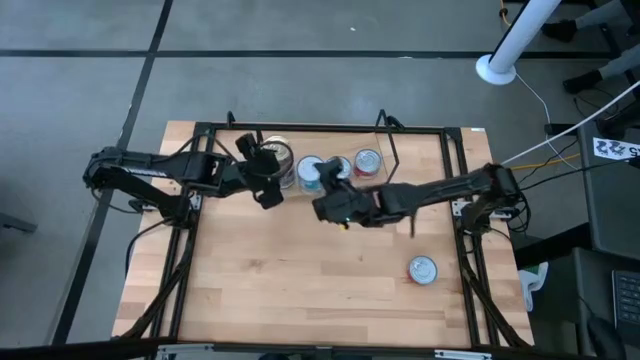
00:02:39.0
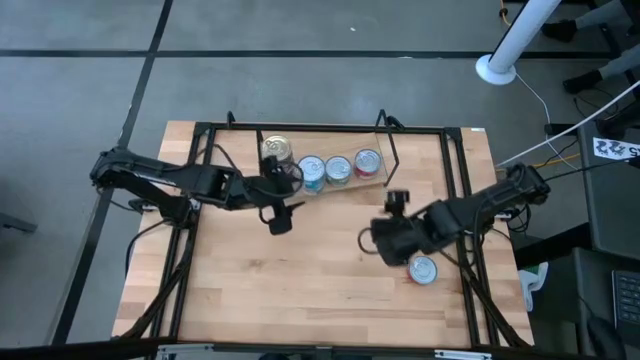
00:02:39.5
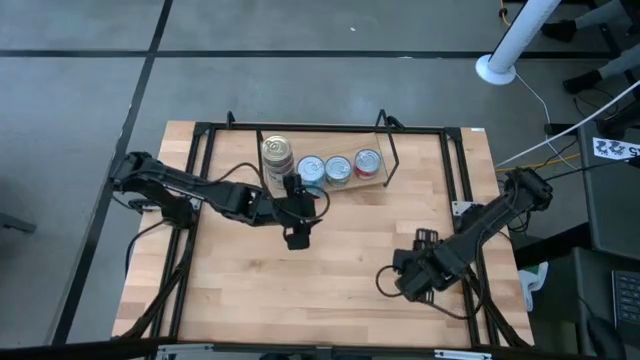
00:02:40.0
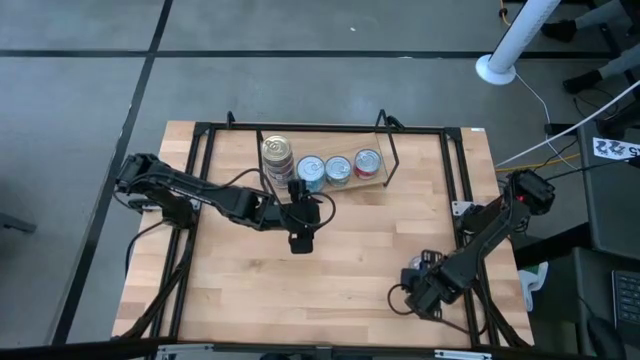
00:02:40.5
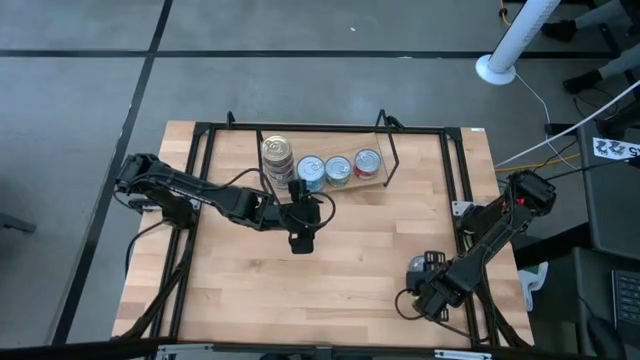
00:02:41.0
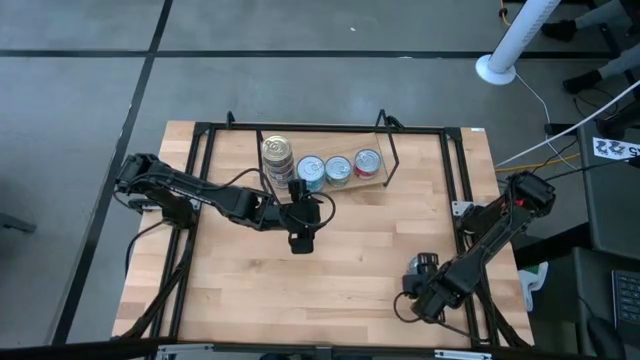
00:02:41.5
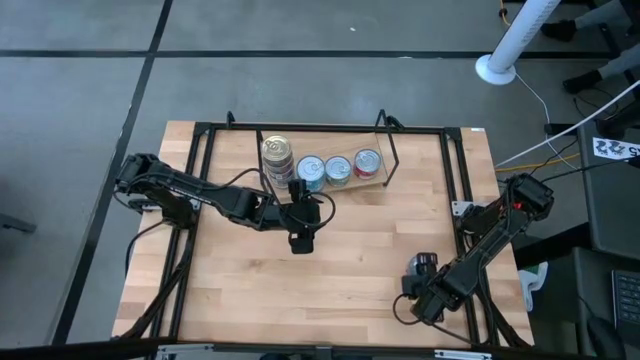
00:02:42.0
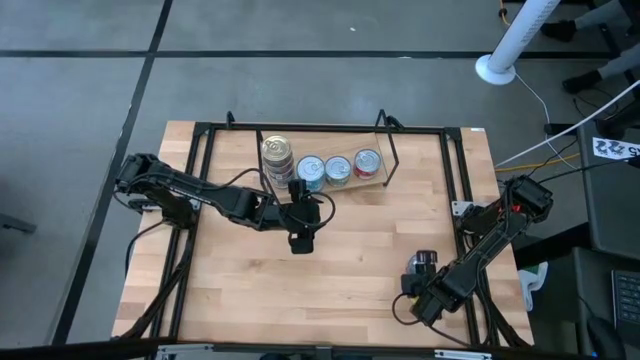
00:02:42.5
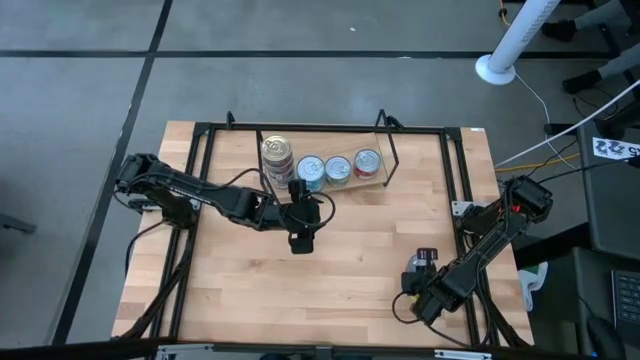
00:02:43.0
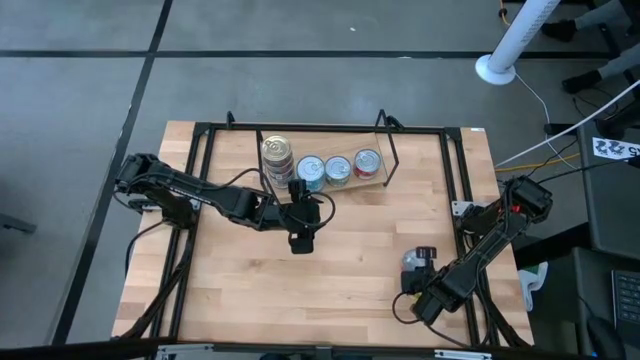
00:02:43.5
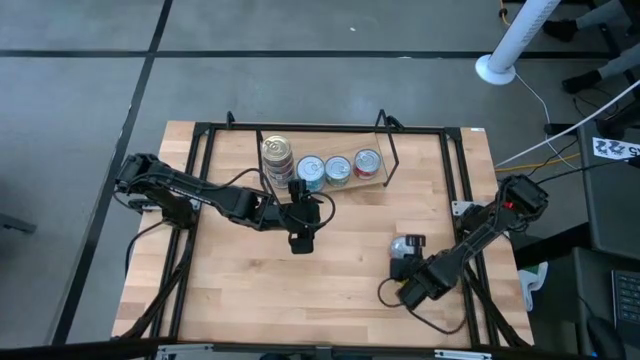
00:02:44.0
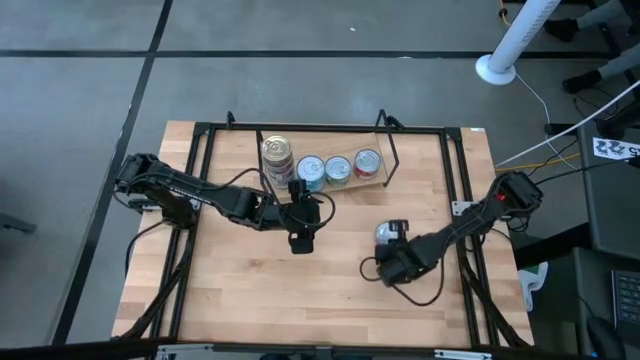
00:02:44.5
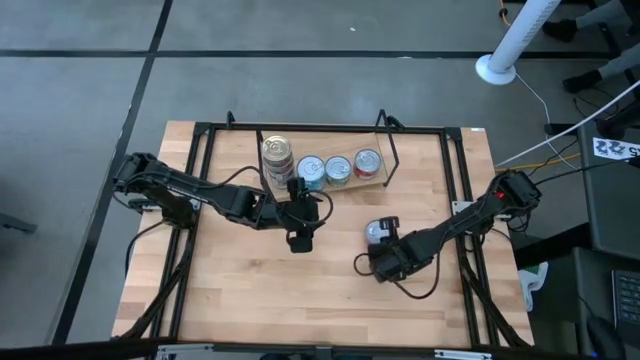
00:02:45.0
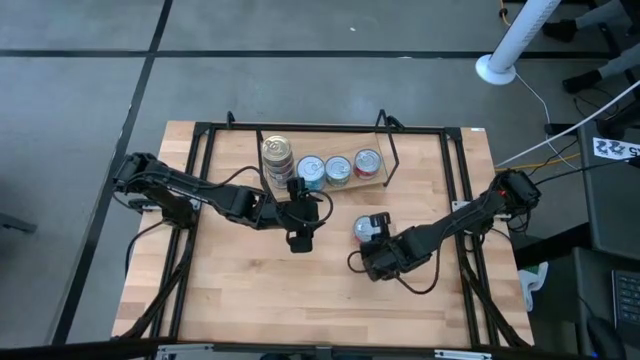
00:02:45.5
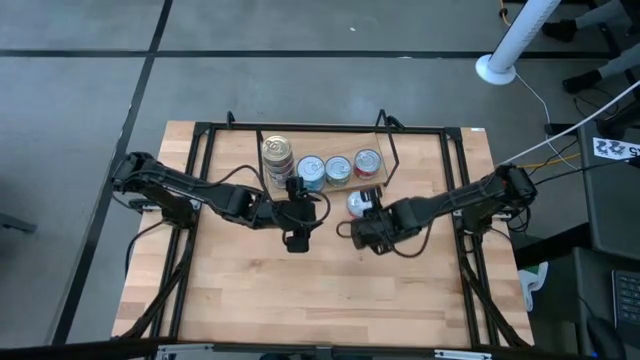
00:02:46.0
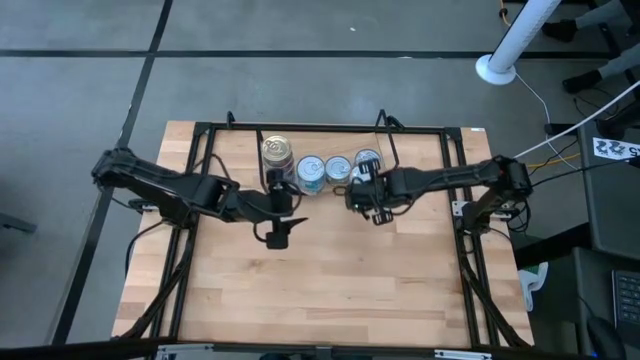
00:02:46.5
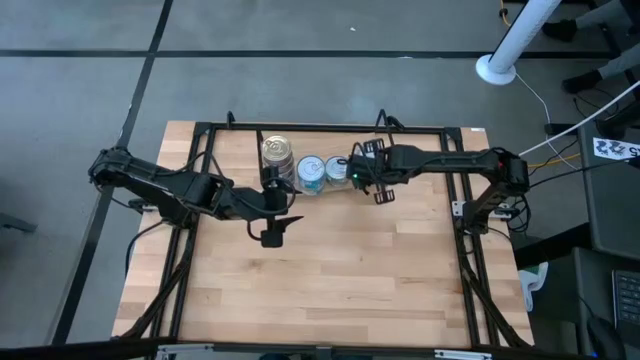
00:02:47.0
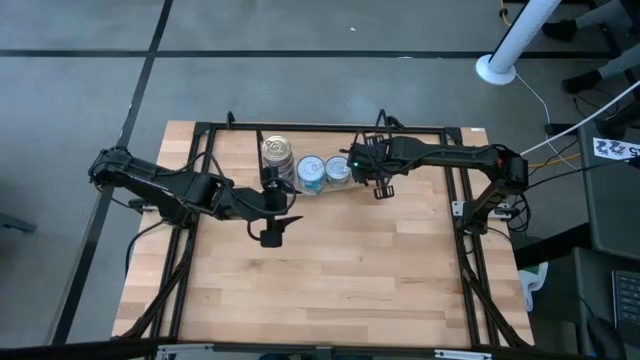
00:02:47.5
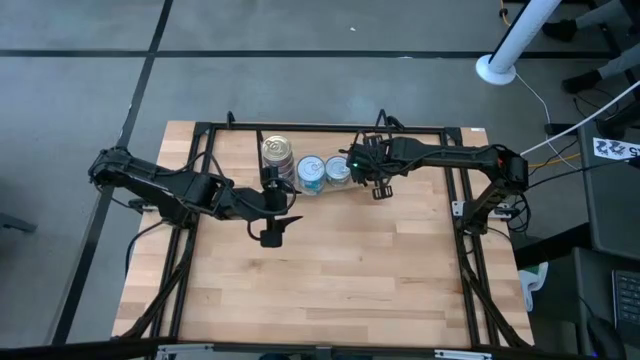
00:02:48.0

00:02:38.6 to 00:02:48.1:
Task: Stack canned seafood by type on shelf
Stack the red tuna can on top of the other red tuna cans on the shelf

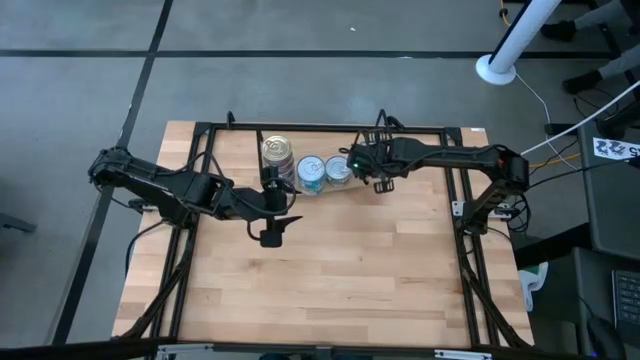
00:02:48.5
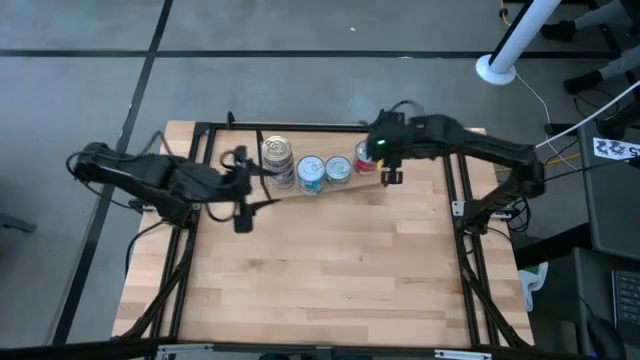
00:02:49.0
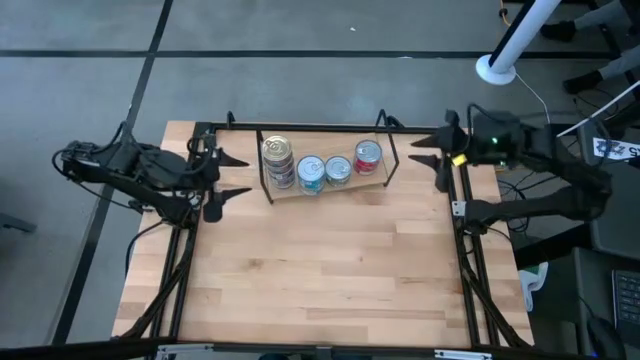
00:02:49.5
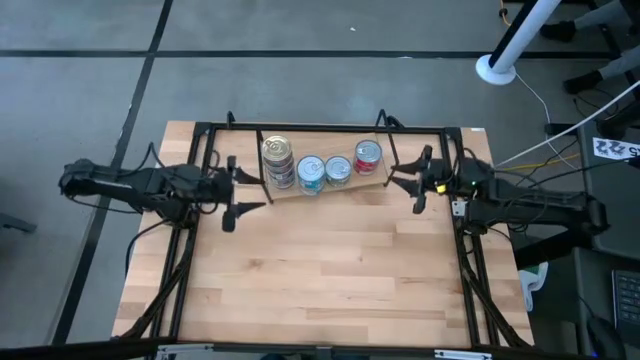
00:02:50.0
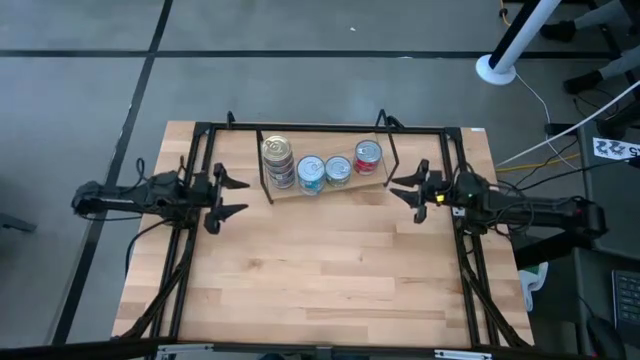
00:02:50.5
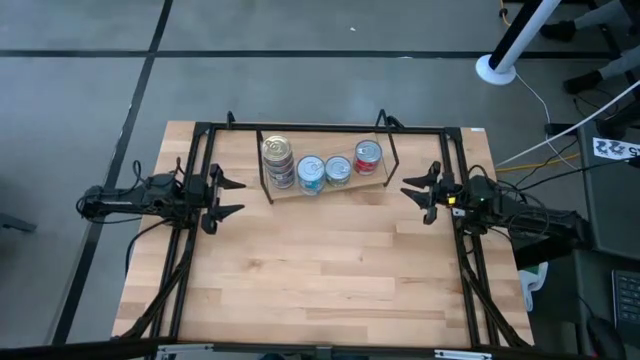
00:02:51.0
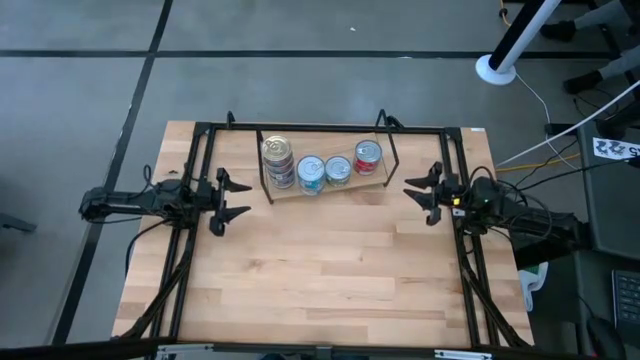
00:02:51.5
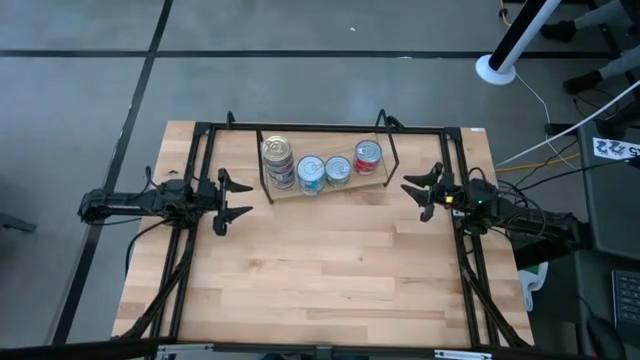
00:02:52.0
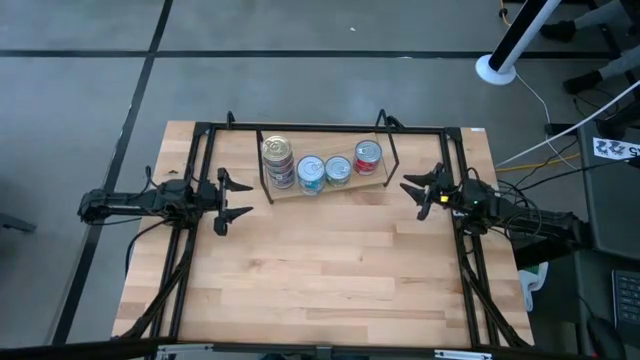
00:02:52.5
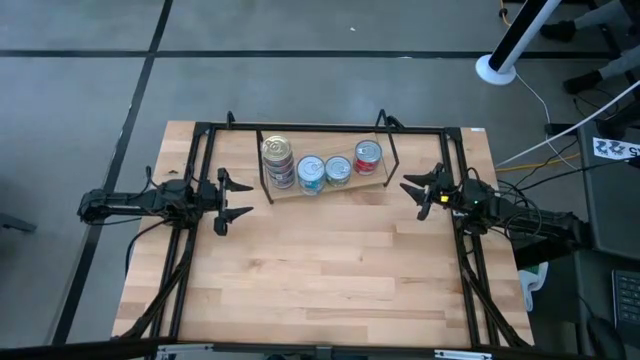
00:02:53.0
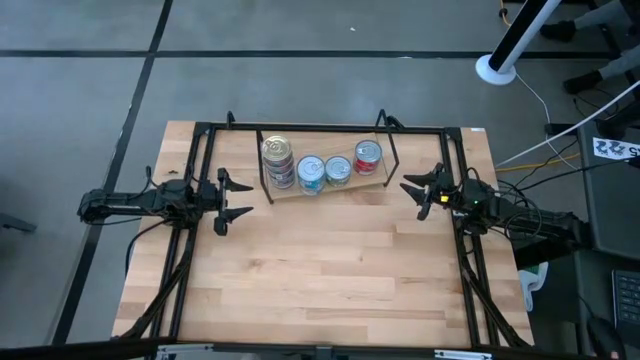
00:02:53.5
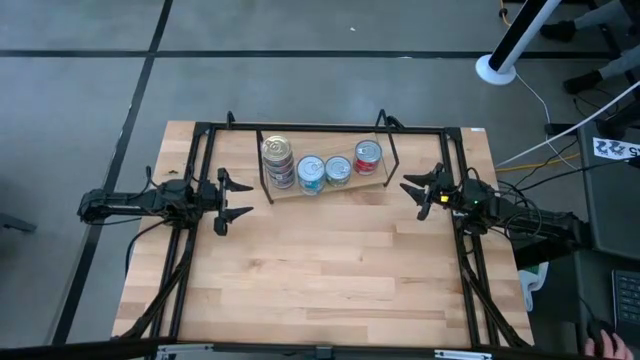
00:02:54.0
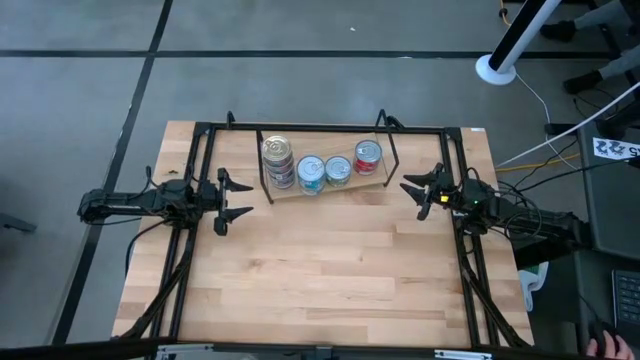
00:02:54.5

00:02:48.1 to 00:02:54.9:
Return to Home Position

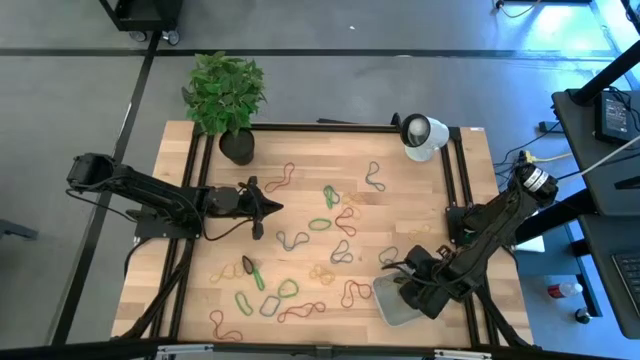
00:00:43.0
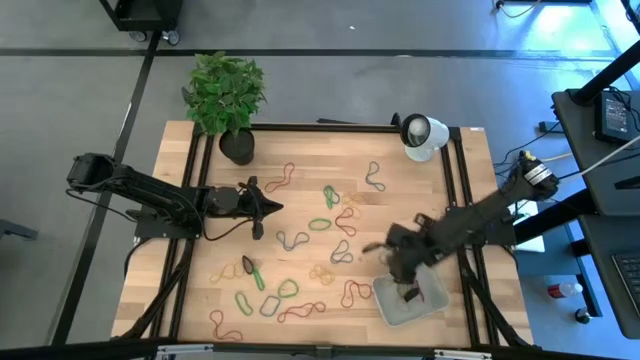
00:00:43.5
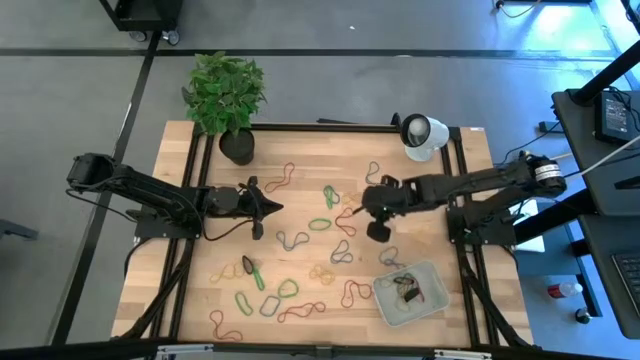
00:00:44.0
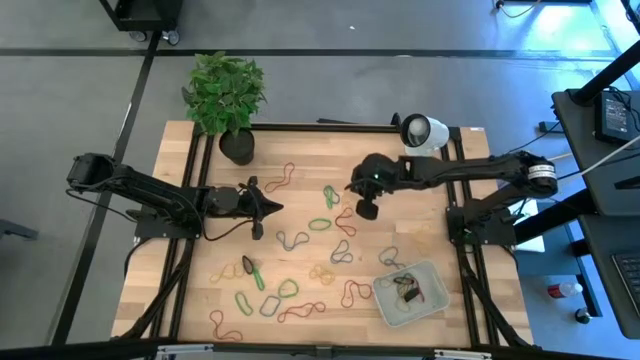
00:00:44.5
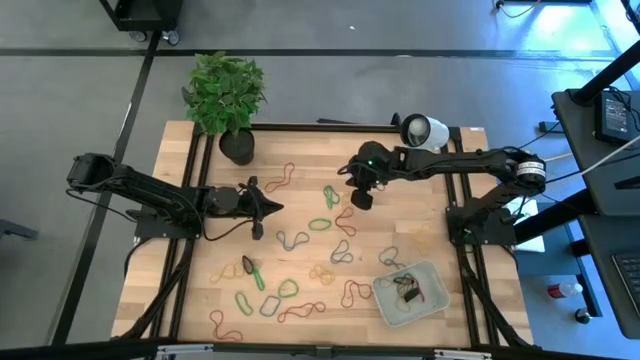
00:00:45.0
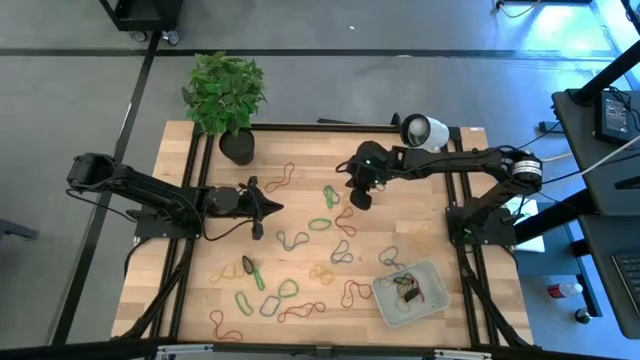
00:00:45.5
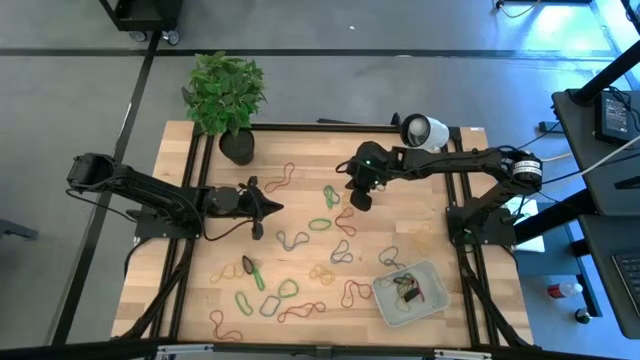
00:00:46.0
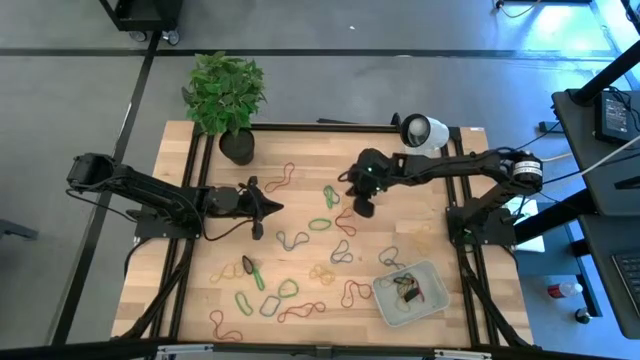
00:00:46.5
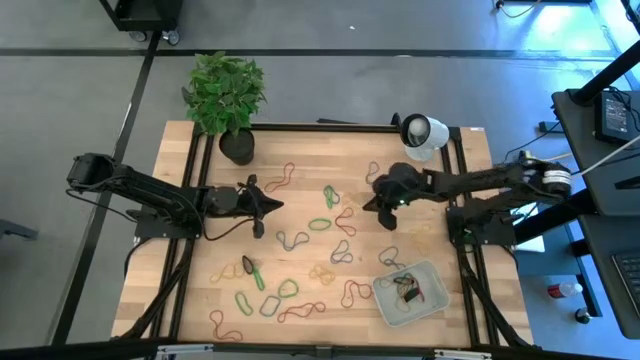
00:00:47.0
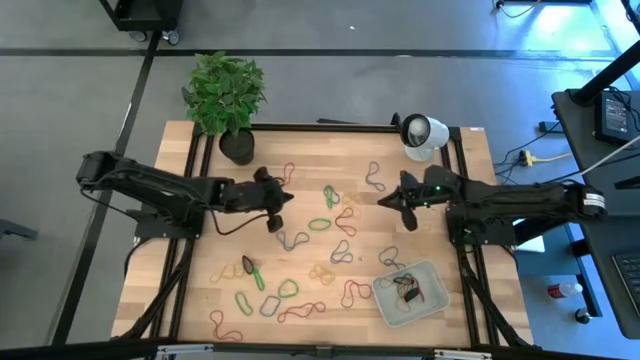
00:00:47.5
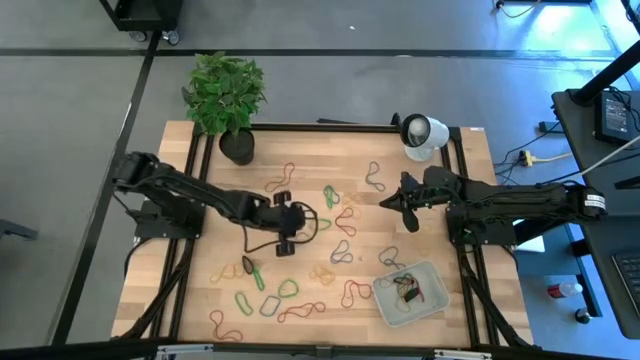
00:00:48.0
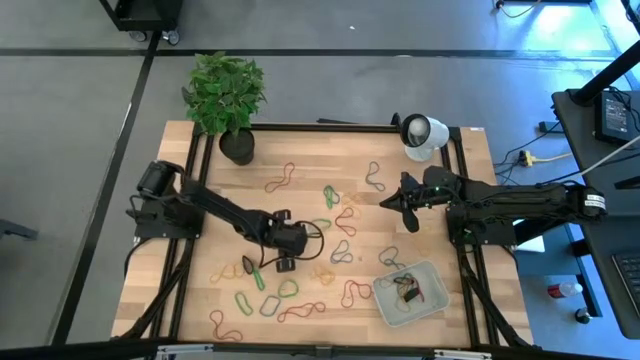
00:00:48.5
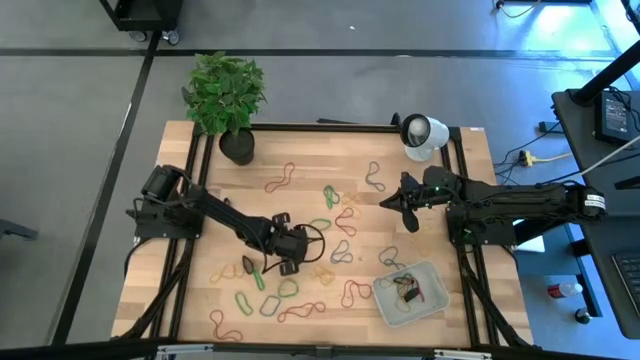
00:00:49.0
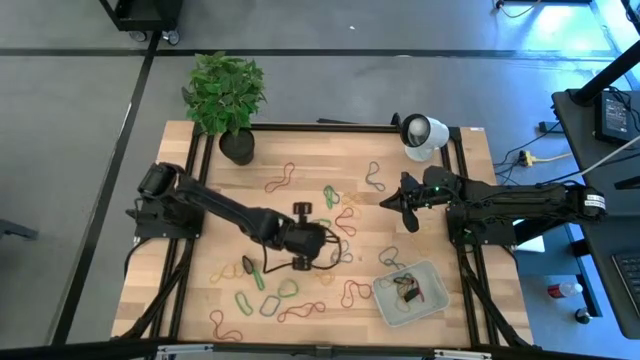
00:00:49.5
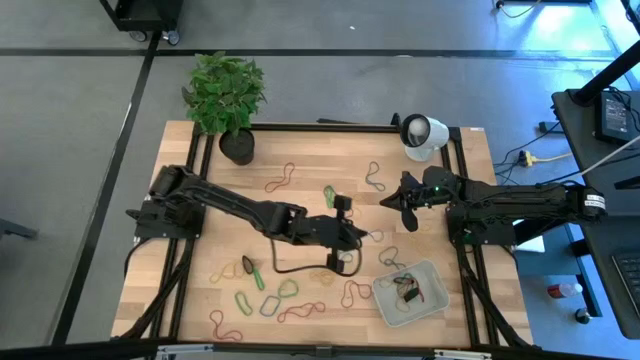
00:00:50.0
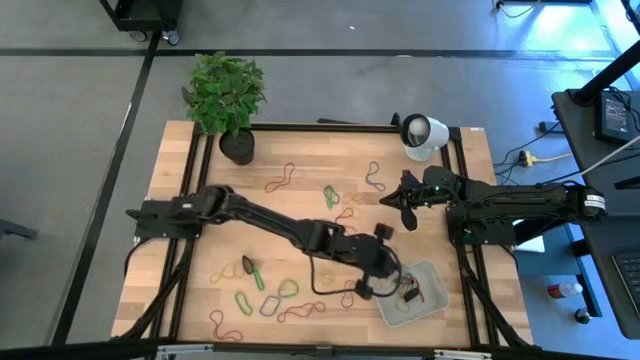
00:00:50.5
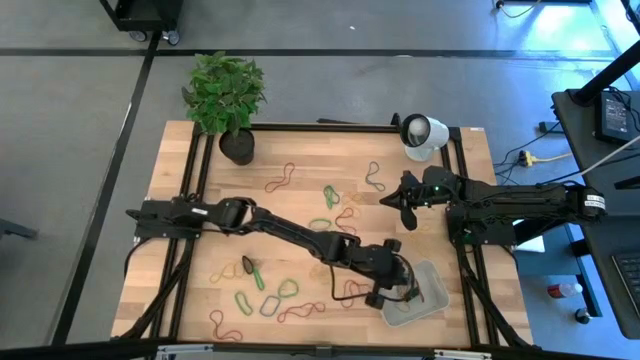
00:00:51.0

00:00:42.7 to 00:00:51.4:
Task: Pick and place rubber bands into bin
Put the blue rubber band into the white bin
